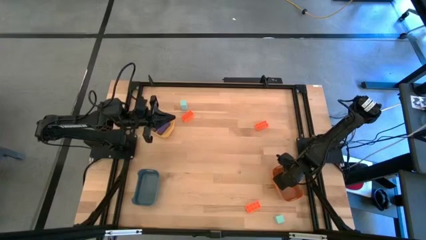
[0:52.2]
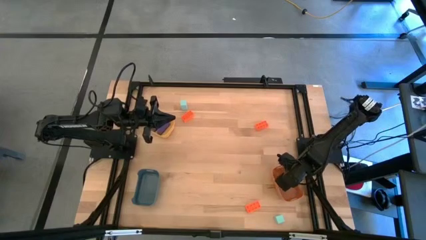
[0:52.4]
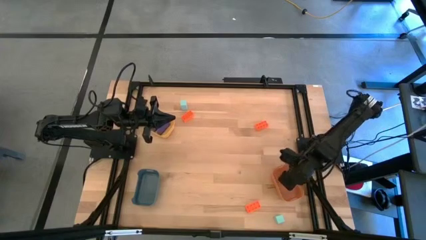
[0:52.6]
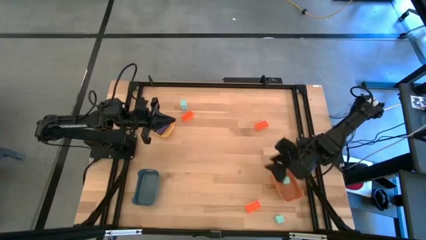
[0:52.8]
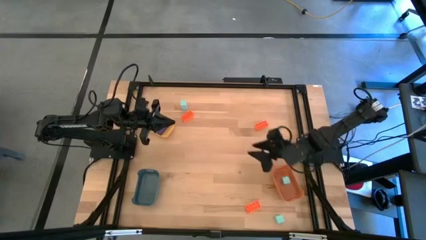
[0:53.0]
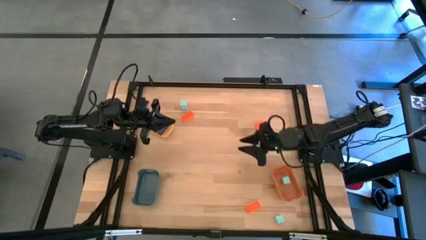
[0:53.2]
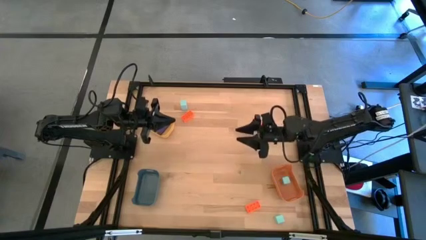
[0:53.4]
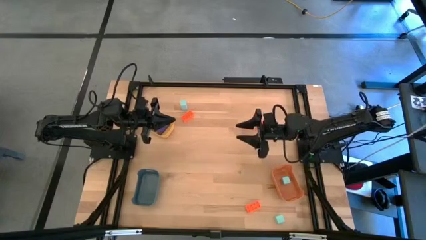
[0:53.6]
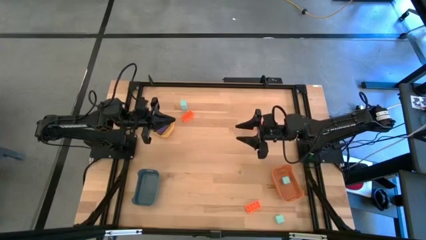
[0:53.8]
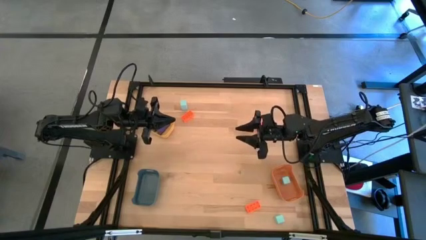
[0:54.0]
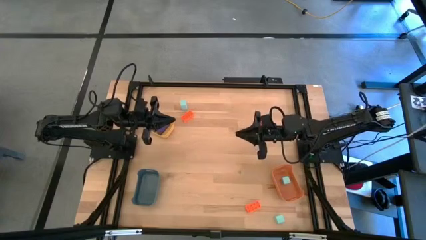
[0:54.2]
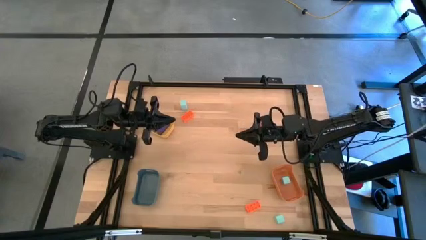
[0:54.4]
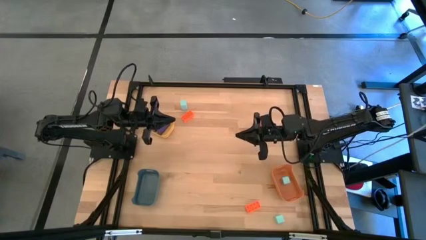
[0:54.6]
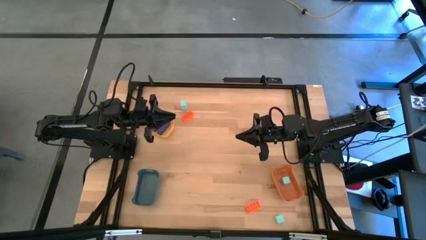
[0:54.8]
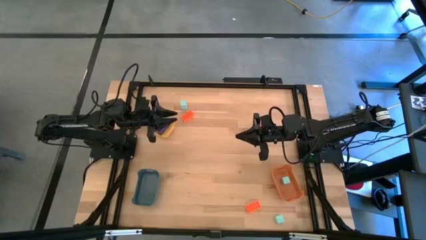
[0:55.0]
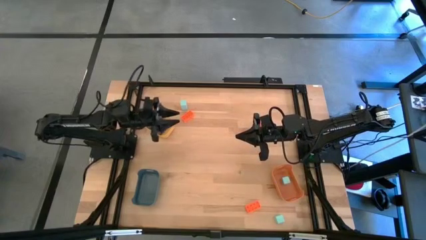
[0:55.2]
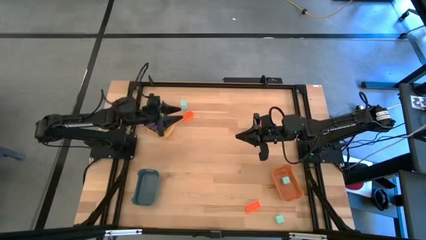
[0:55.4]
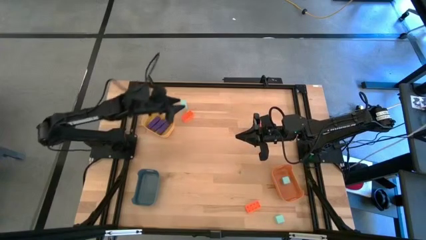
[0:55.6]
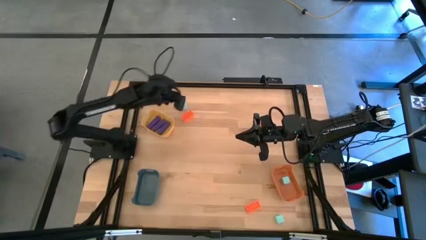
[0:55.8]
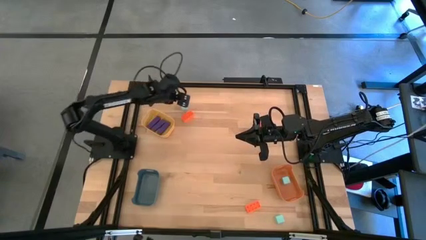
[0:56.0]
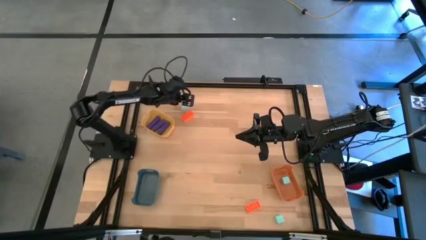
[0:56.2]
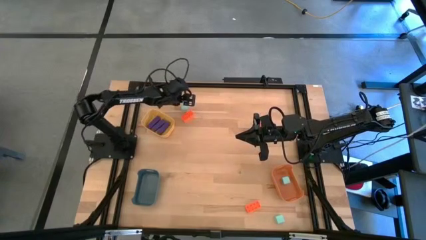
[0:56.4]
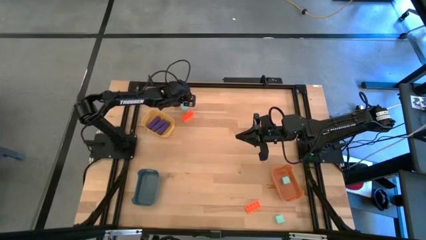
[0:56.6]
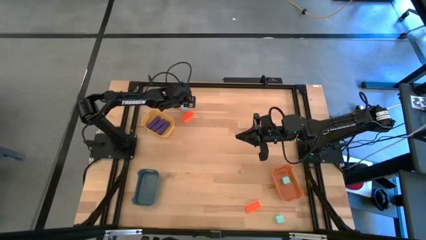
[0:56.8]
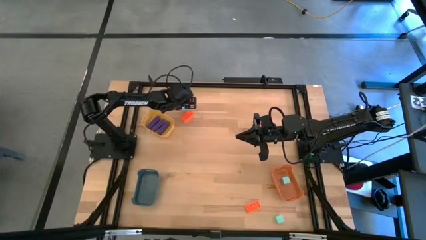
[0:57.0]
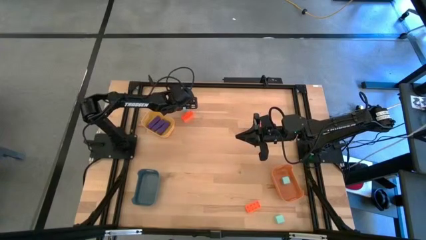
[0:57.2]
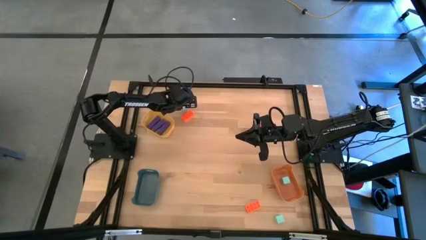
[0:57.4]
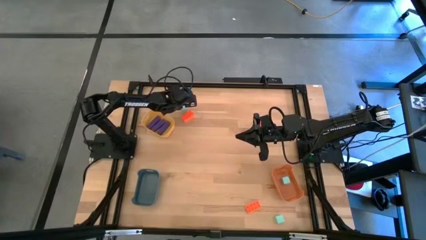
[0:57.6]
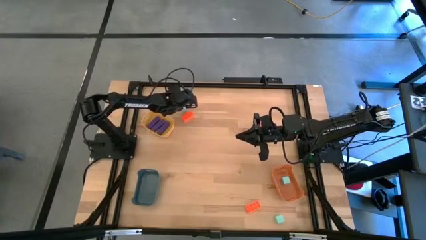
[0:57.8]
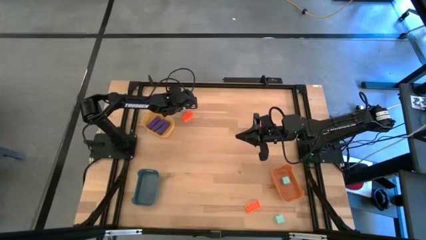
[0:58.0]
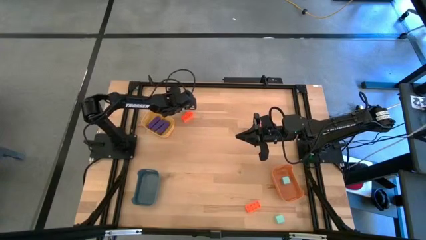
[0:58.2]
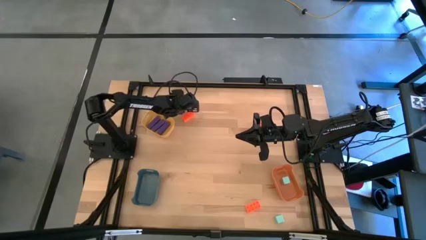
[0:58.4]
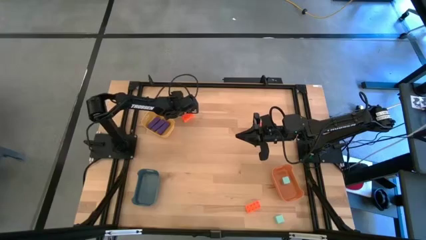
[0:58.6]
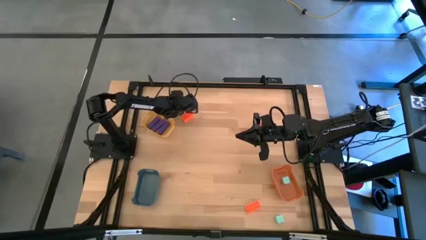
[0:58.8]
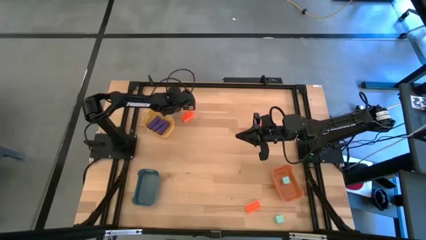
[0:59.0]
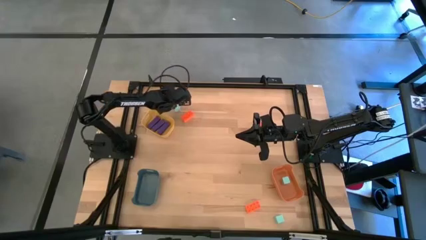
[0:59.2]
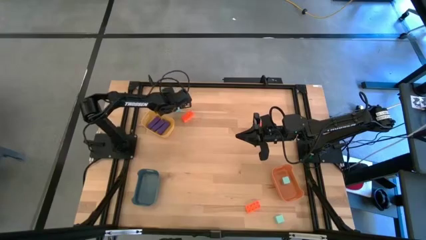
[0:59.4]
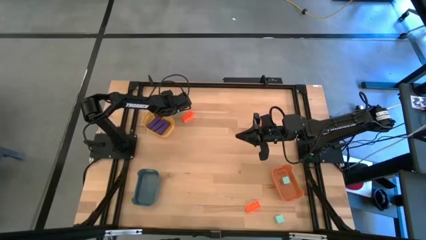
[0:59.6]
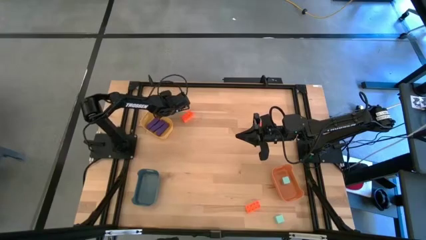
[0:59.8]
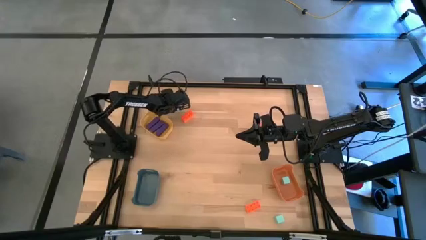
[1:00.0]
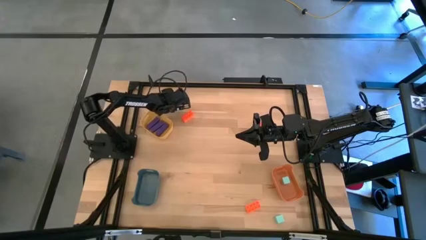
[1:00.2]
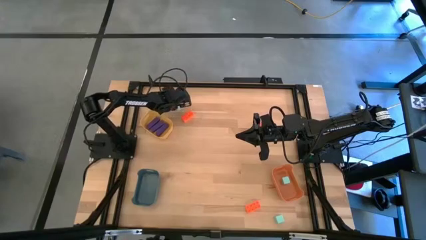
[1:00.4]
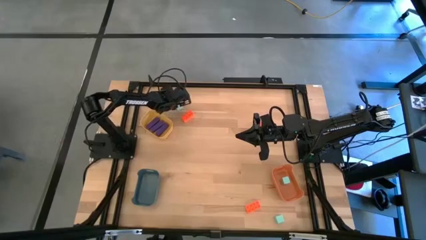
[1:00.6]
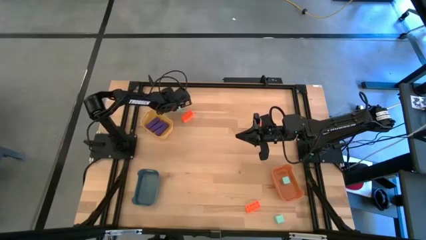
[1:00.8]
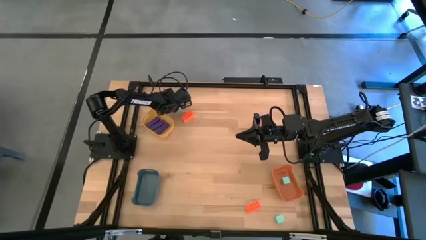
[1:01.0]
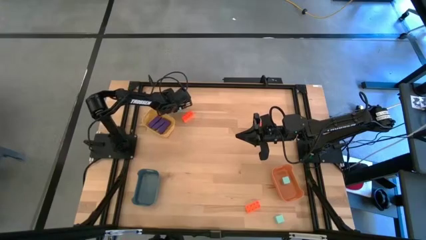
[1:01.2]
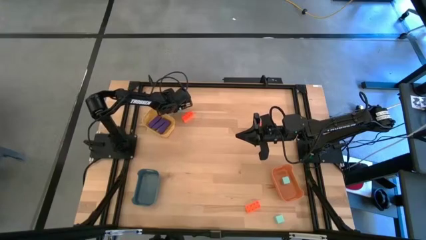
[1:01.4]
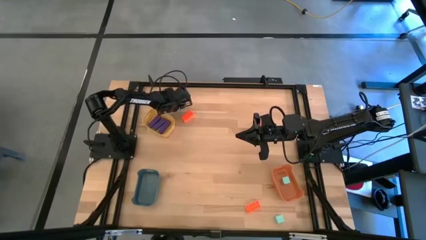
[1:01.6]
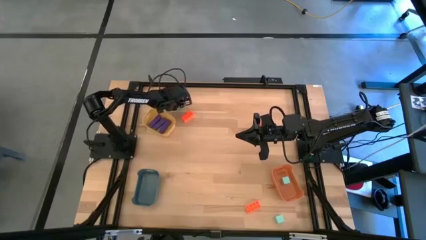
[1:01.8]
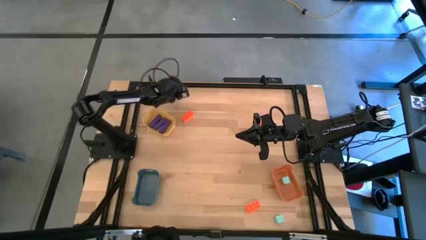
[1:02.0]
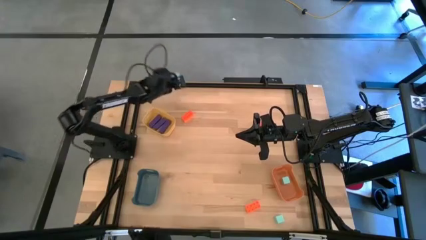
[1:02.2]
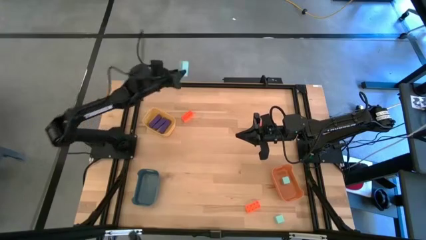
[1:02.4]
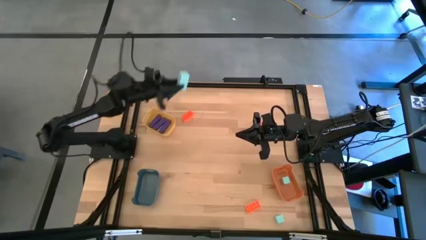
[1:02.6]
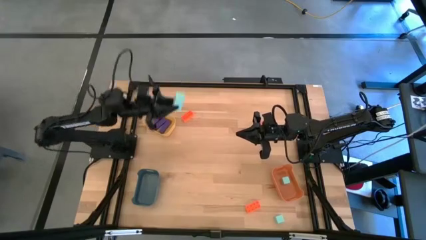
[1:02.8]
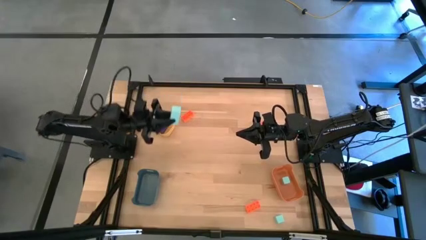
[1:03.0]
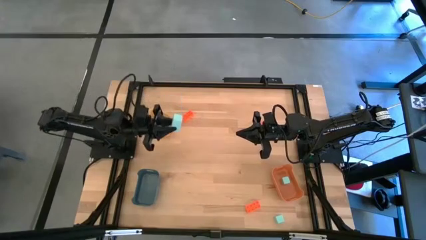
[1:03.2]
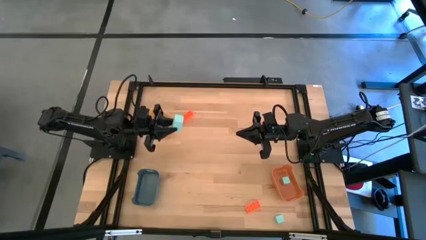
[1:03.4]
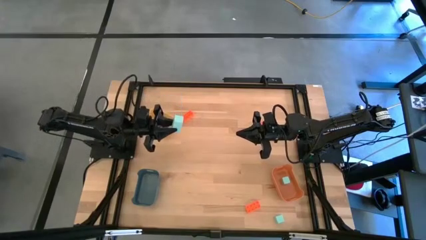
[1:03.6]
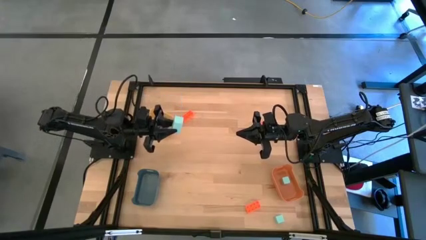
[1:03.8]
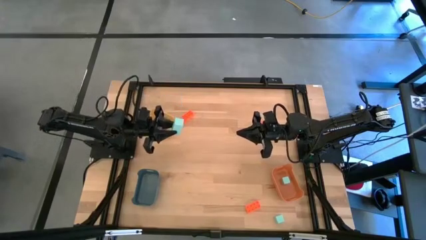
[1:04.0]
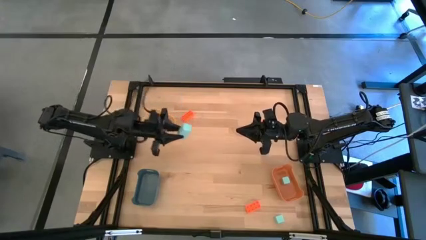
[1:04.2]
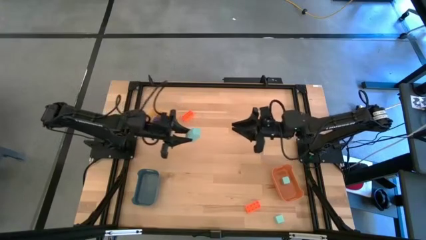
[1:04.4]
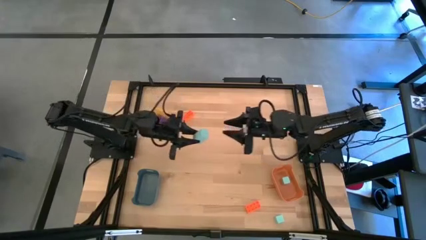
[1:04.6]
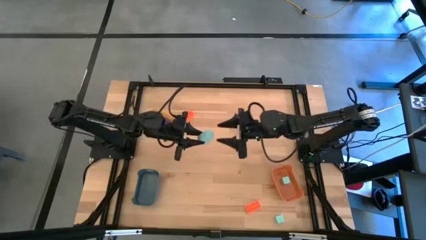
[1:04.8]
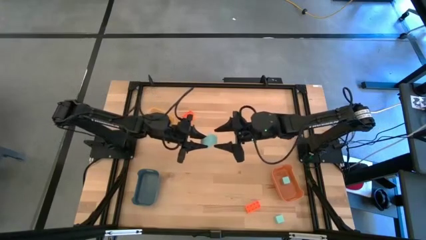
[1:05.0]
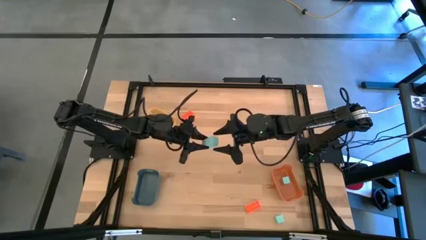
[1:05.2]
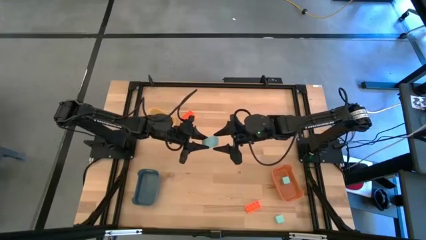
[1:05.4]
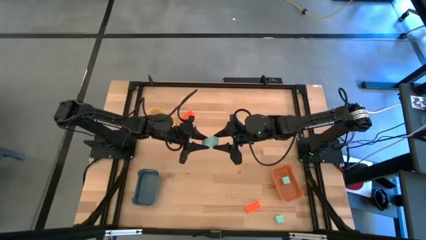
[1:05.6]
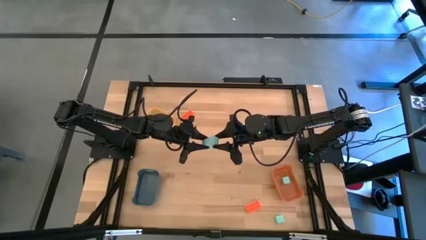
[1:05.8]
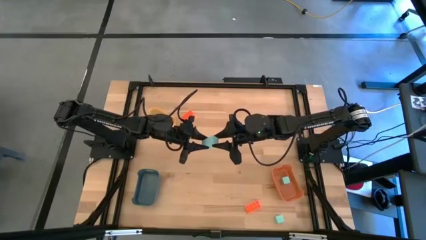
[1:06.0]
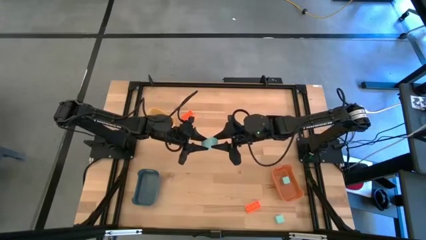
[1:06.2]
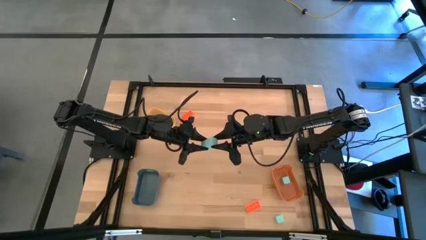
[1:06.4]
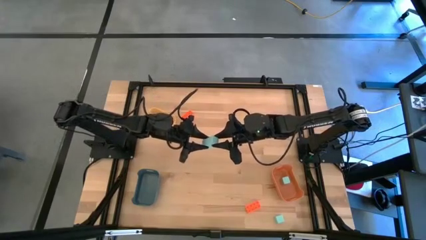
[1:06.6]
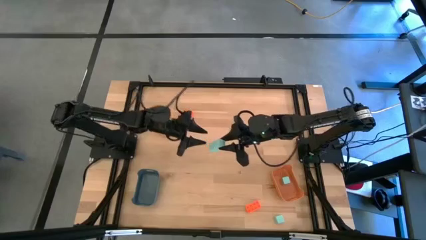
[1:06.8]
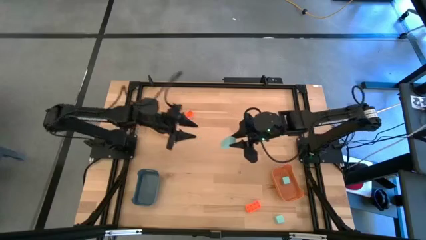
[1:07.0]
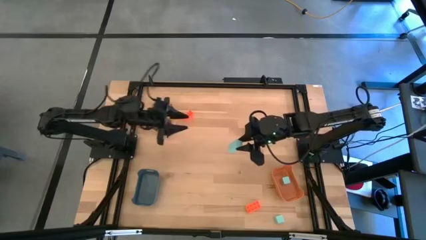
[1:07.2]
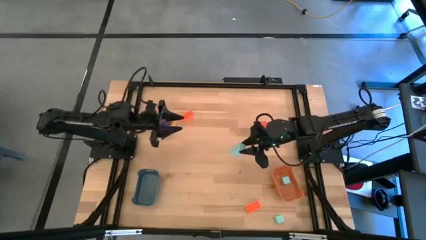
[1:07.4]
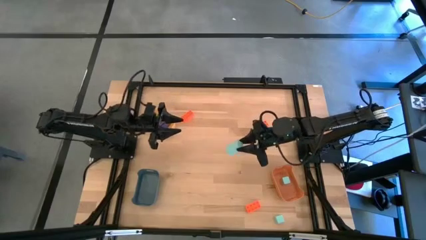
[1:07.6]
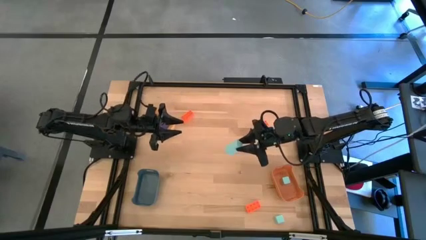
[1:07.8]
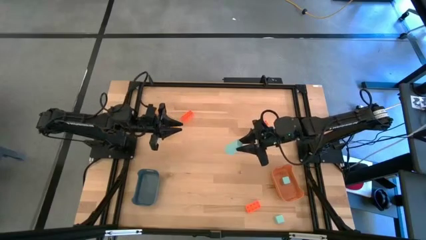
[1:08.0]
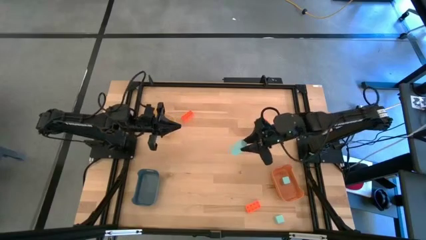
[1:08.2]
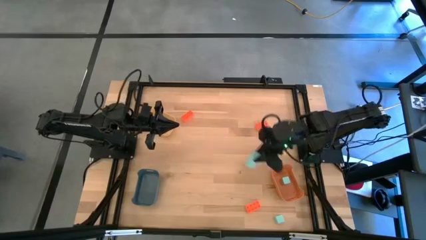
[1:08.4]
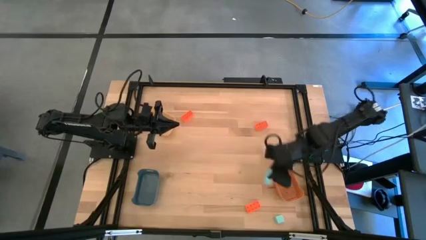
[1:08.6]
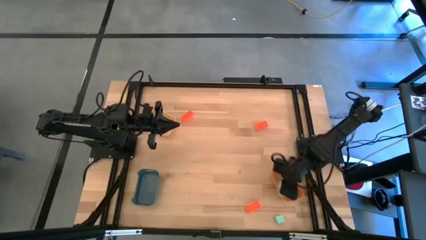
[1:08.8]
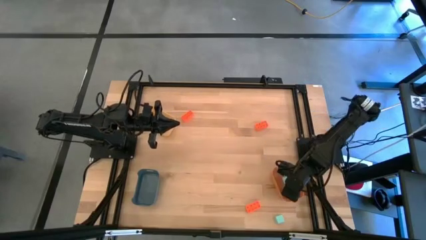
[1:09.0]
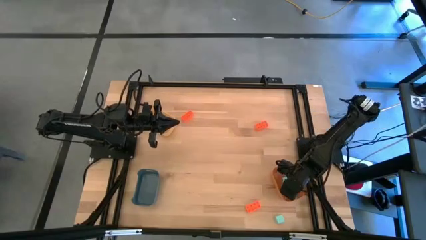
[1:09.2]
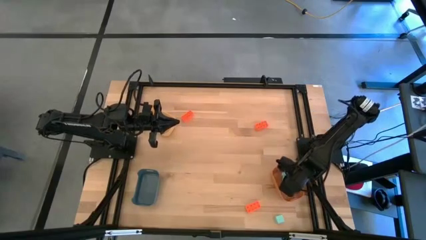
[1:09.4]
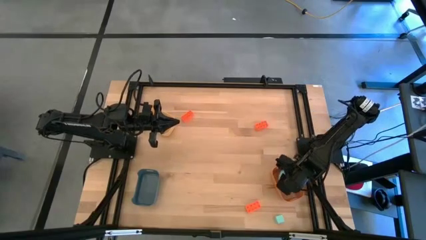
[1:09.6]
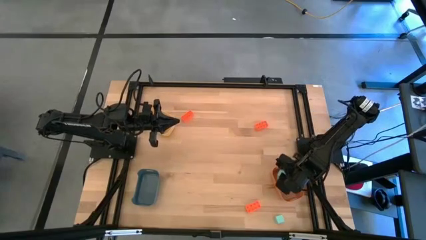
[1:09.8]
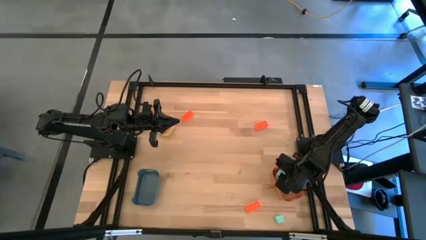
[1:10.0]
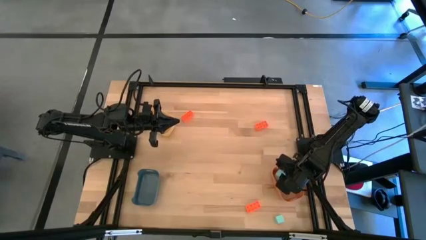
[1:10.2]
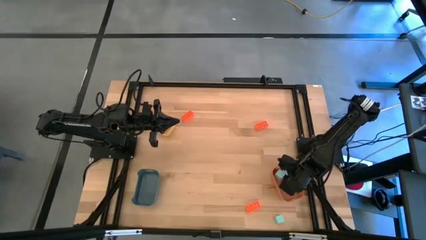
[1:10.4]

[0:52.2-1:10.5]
Task: Sort & place blocks by color
Put the top light blue wooden block into the orange bin
